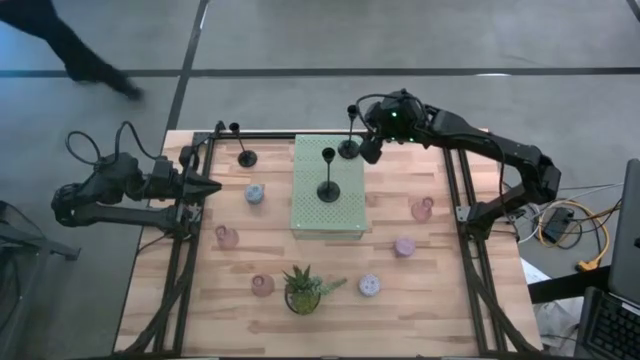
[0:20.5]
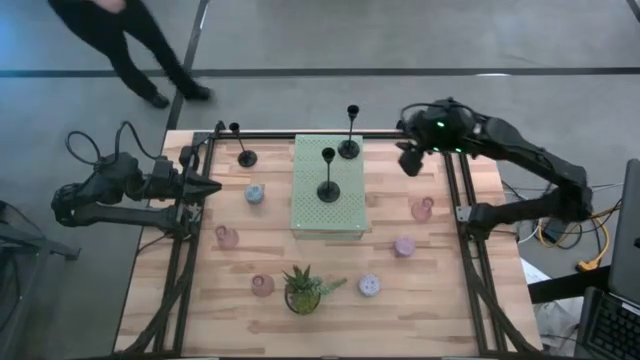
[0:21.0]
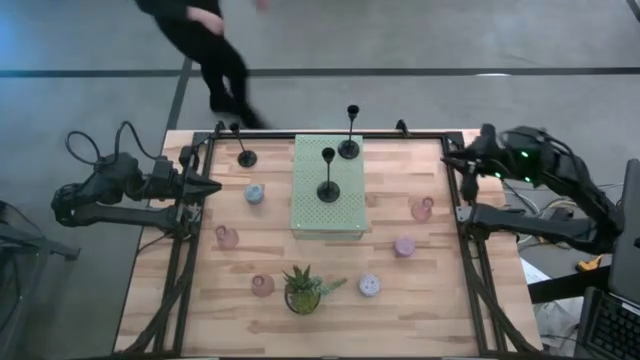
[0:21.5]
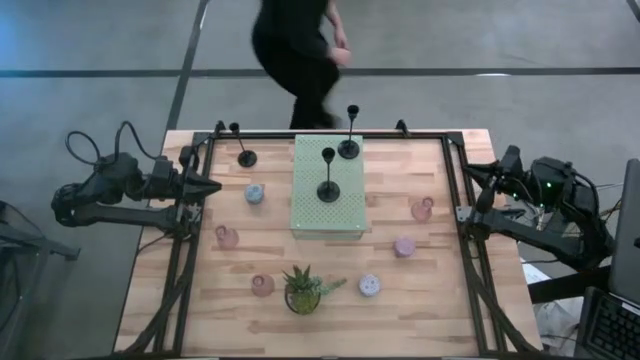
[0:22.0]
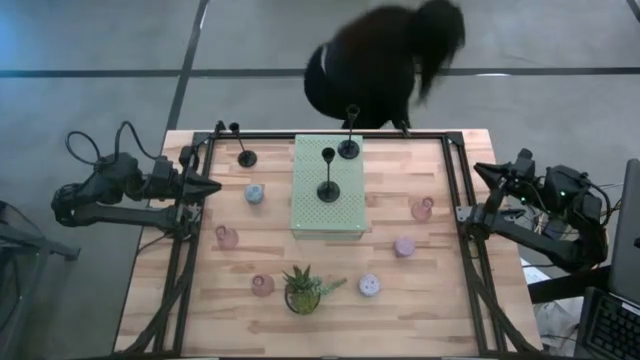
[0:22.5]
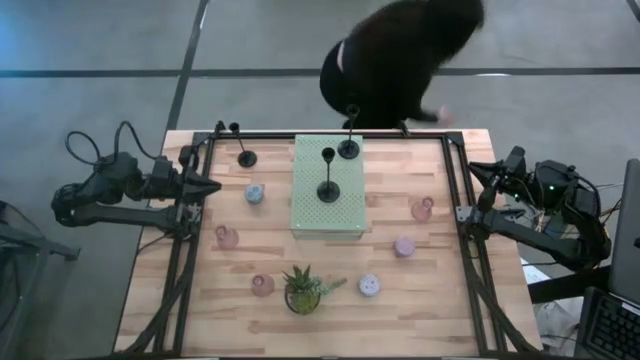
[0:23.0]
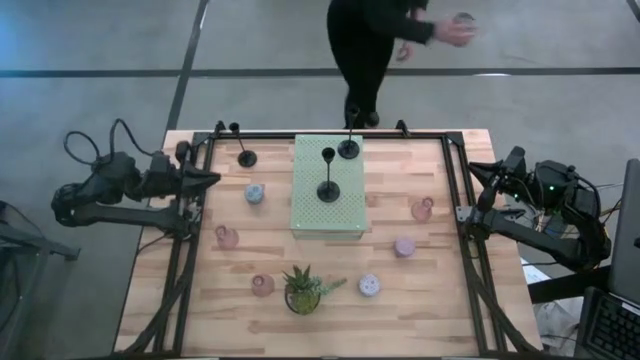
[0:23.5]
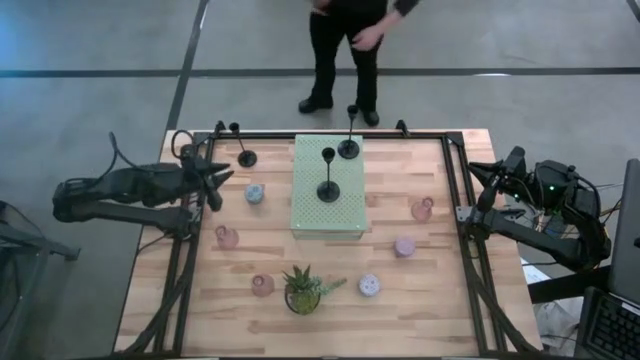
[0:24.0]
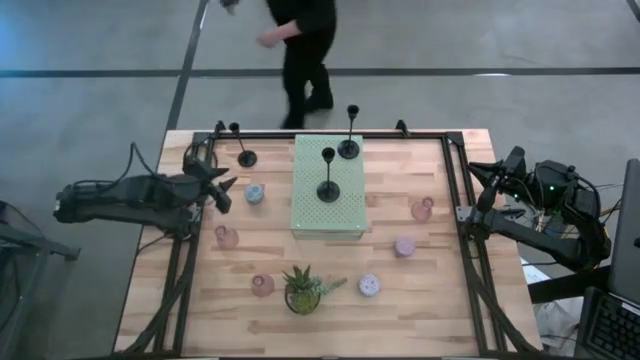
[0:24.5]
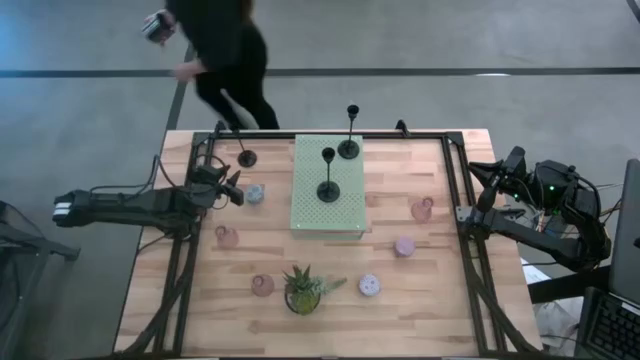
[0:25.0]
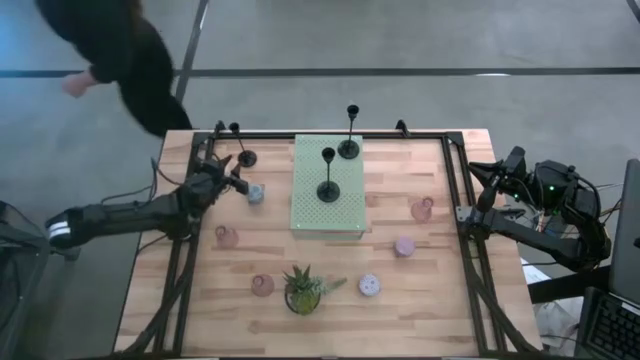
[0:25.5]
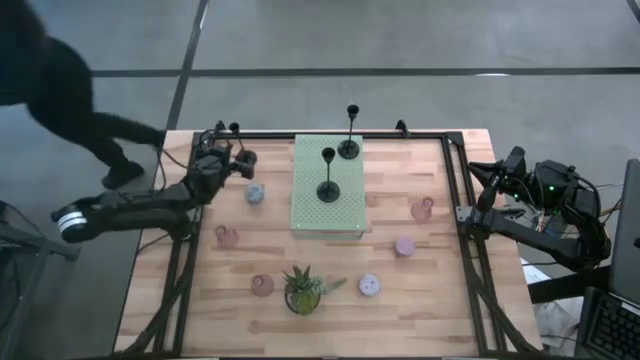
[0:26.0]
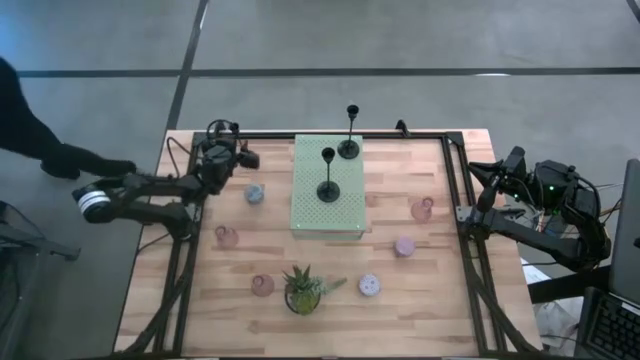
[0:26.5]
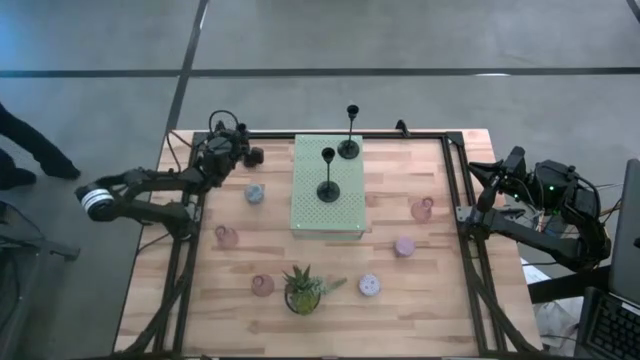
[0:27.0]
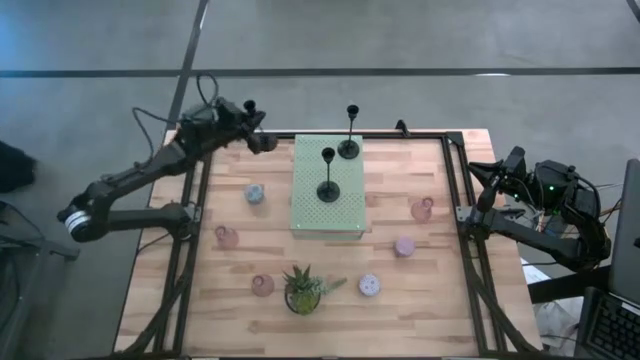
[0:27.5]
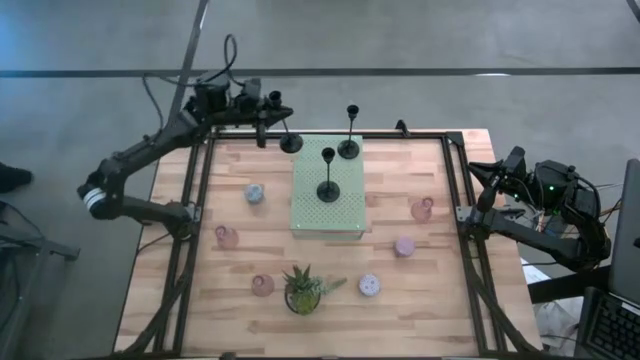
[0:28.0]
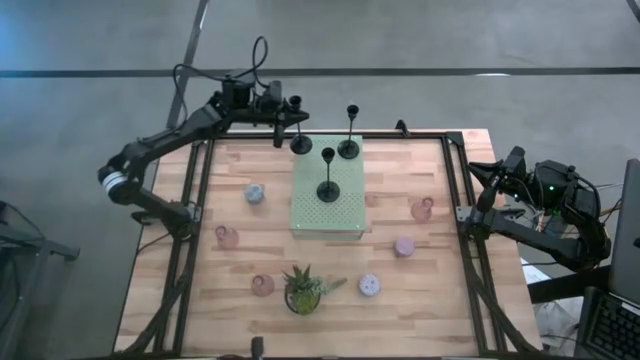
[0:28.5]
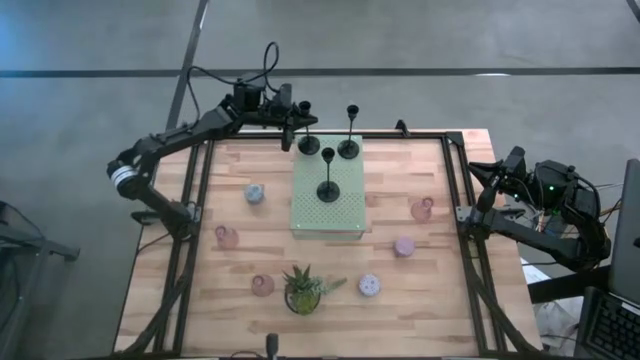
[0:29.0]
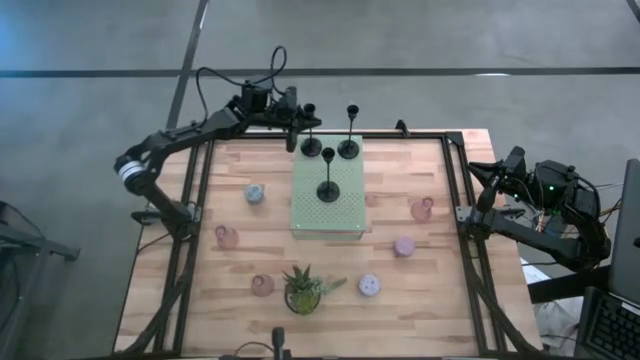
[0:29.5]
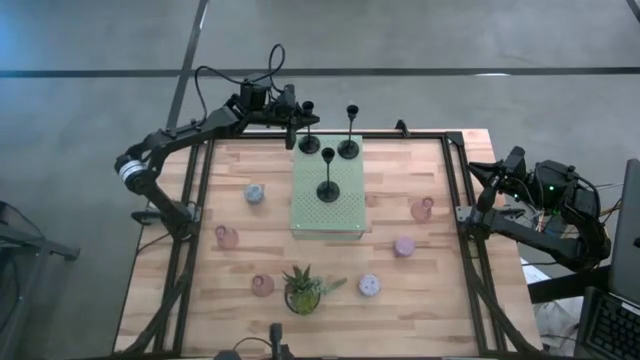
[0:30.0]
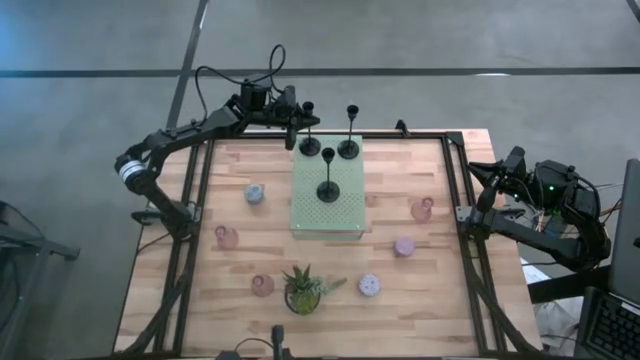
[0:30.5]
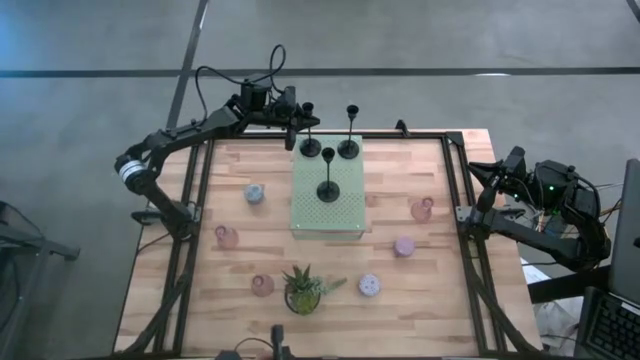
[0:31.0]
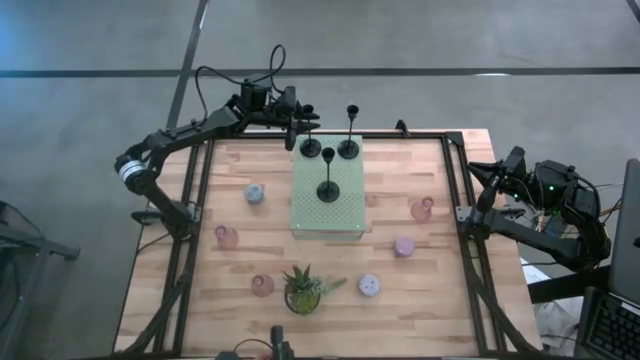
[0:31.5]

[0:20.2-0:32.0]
Task: Pick & Place candle stick holders
Put the black candle holder on the shelf

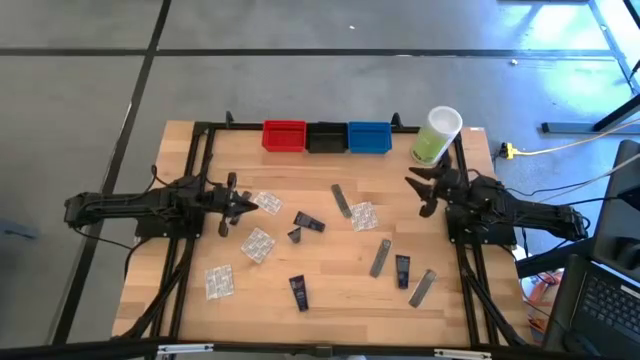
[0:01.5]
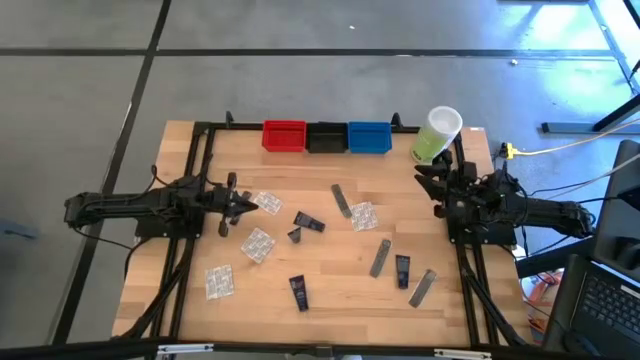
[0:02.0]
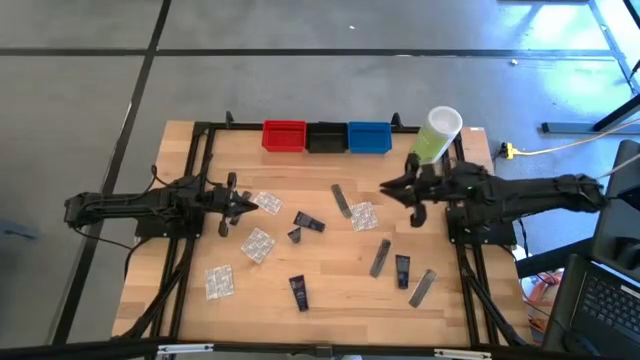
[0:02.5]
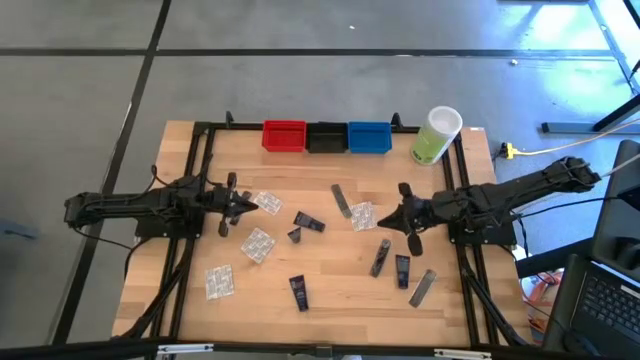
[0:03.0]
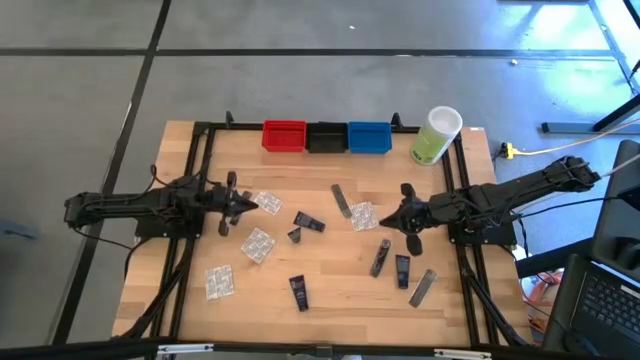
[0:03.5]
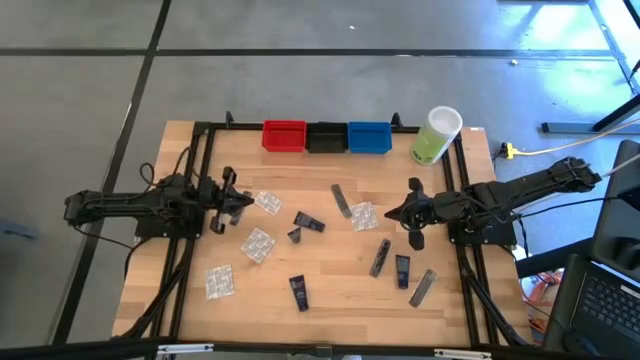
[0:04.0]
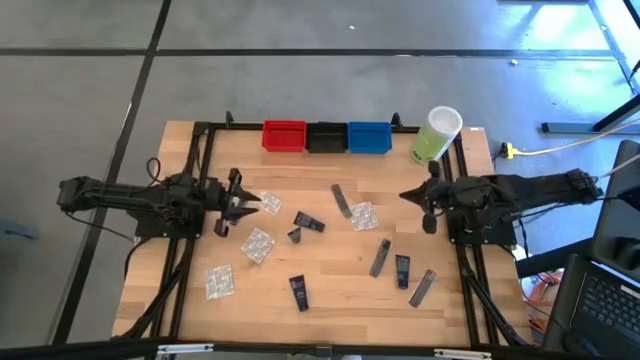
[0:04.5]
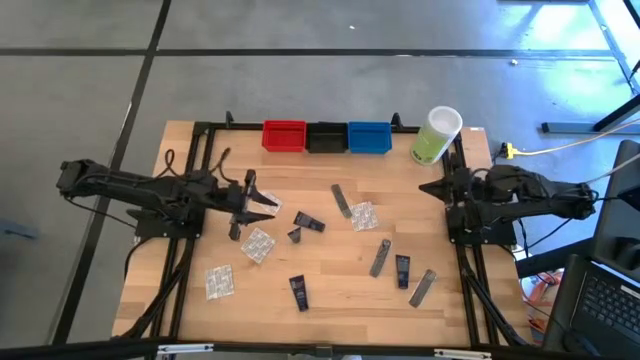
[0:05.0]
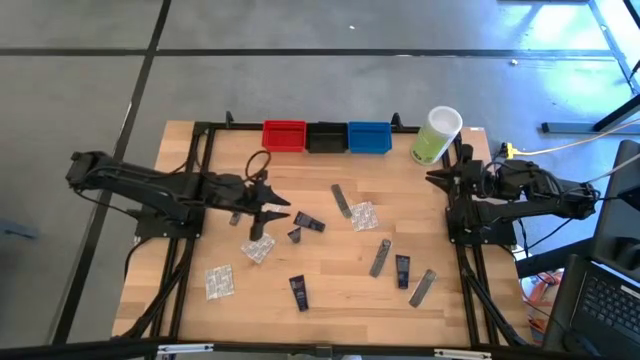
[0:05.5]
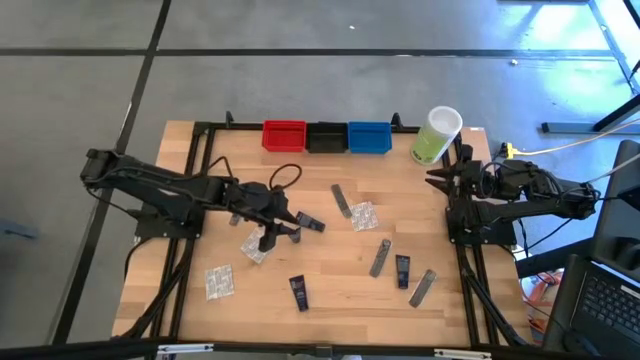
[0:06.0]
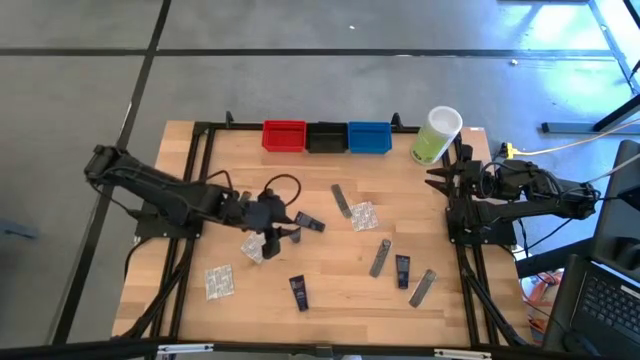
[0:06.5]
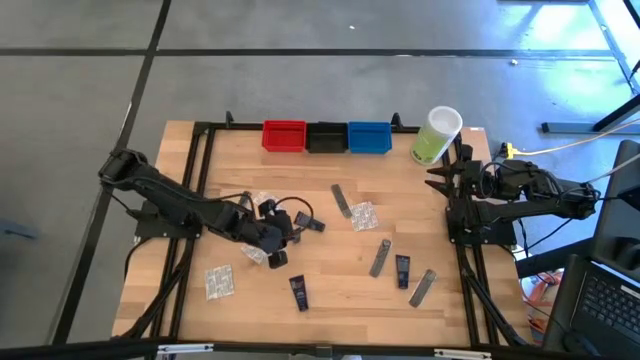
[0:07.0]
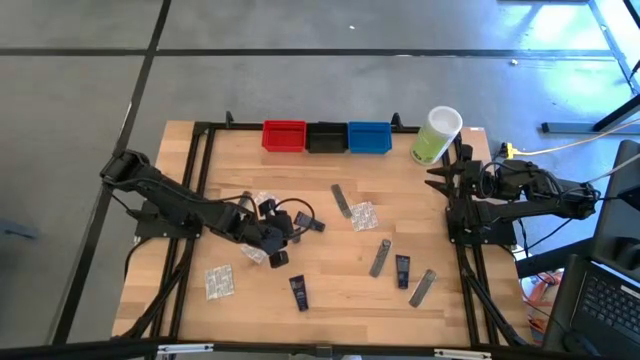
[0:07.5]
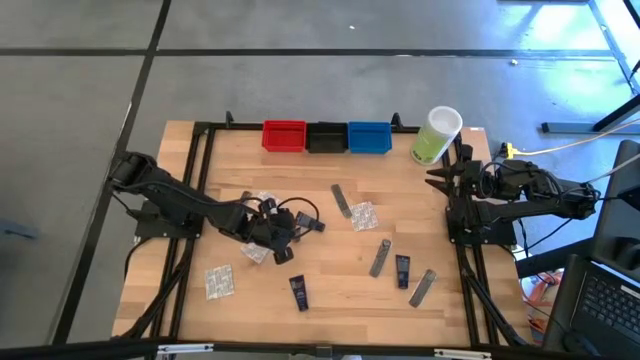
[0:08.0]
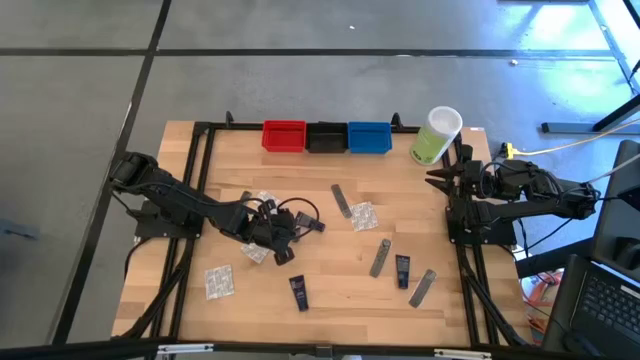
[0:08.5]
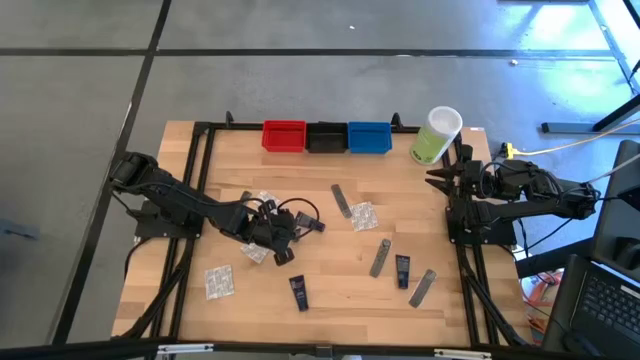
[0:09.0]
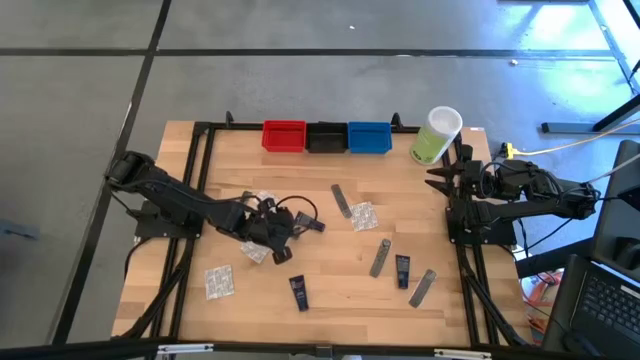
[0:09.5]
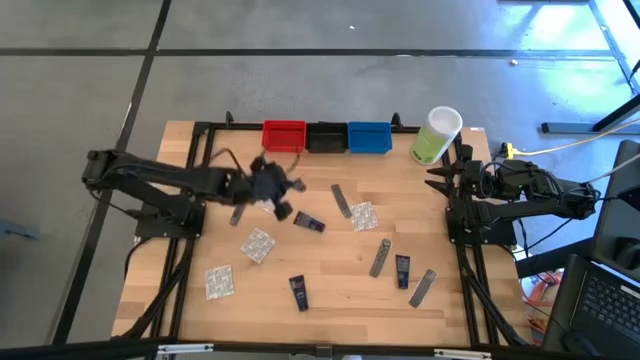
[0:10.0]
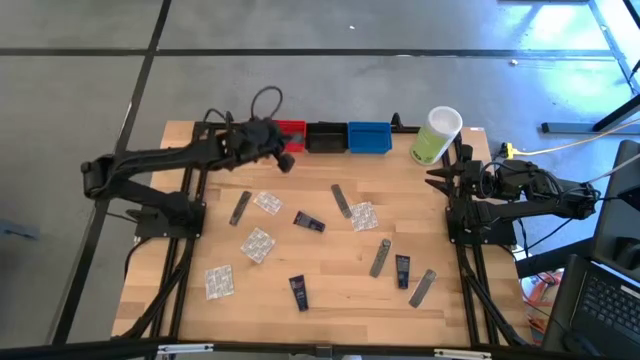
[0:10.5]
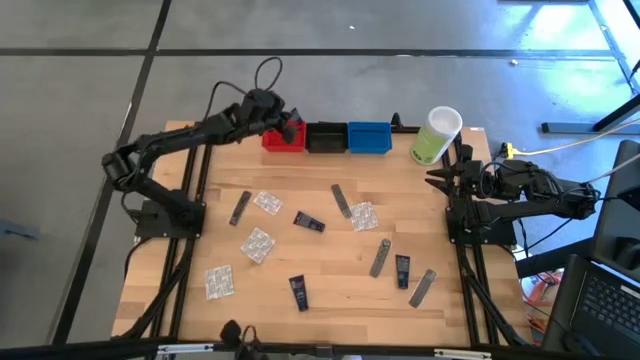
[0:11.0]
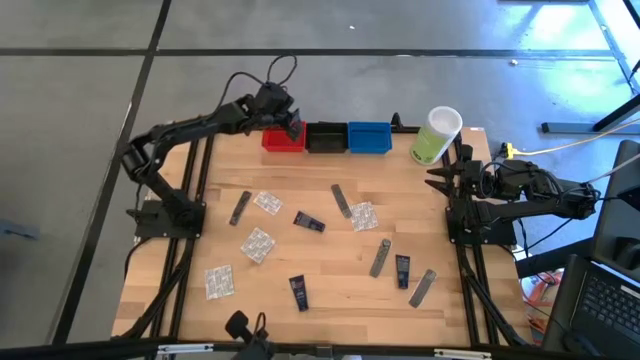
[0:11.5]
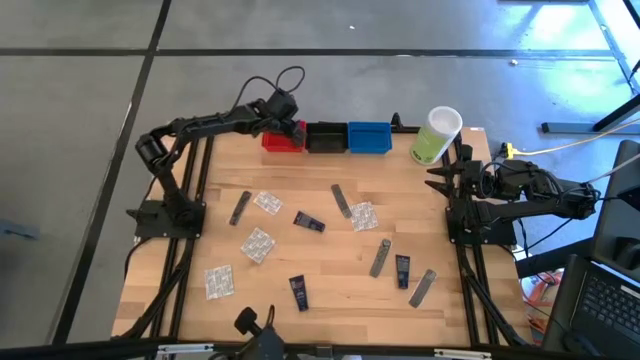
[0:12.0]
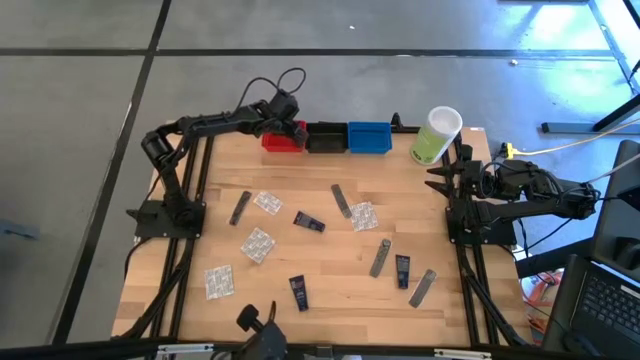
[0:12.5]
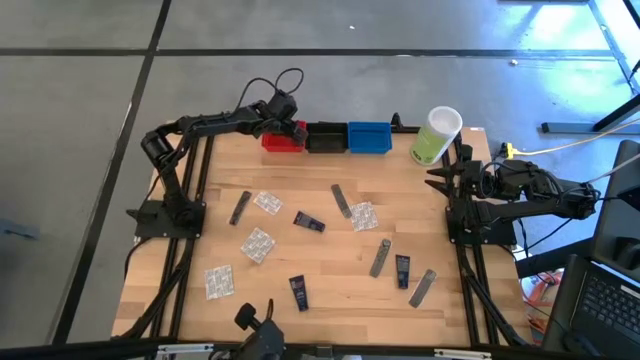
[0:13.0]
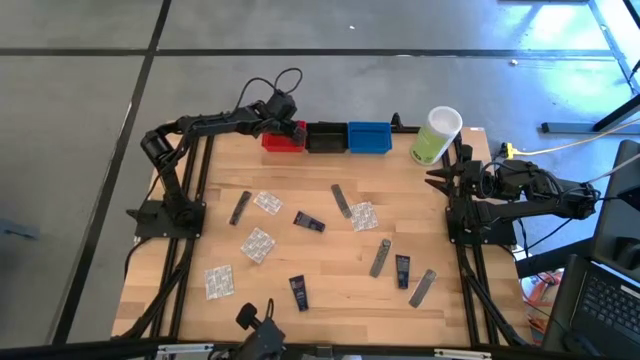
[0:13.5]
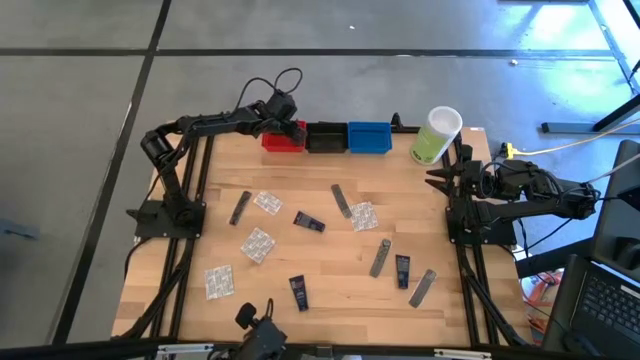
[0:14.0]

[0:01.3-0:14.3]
Task: Pick & Place Travel size toiletries
Put the blue shave cream into the red bin
